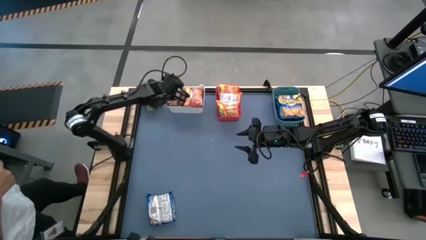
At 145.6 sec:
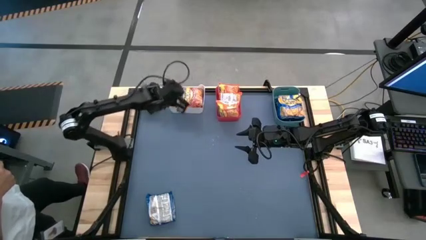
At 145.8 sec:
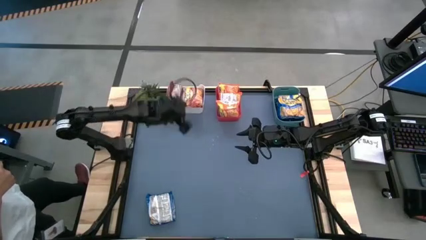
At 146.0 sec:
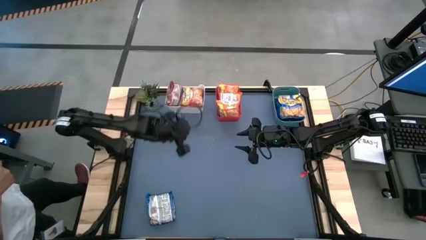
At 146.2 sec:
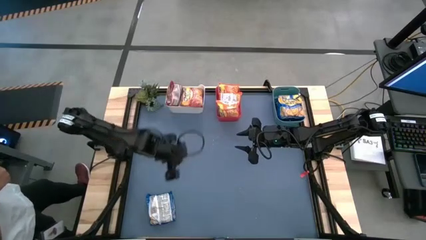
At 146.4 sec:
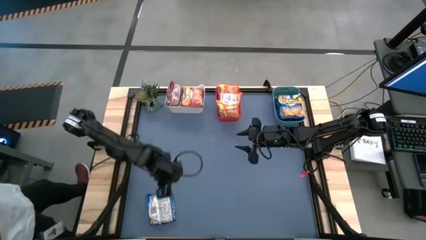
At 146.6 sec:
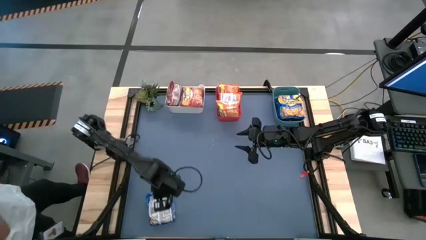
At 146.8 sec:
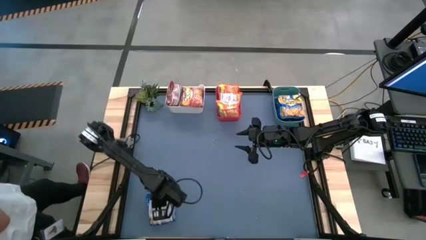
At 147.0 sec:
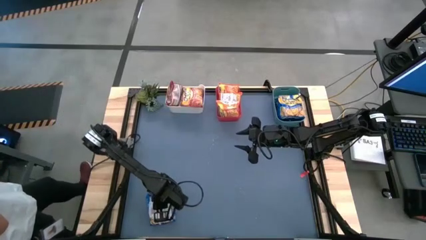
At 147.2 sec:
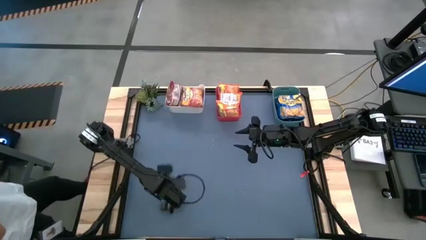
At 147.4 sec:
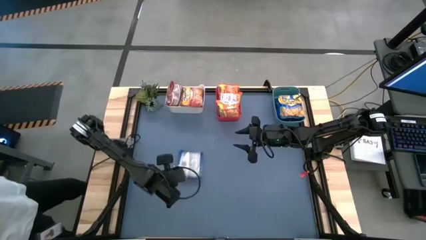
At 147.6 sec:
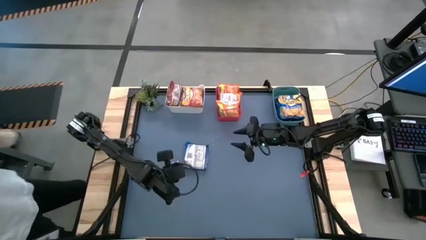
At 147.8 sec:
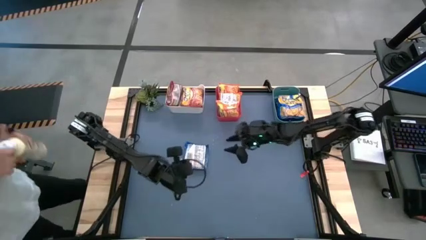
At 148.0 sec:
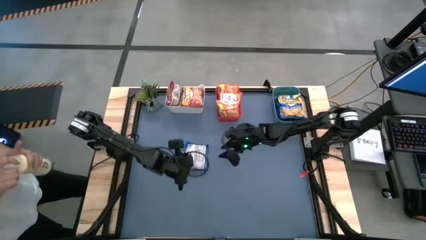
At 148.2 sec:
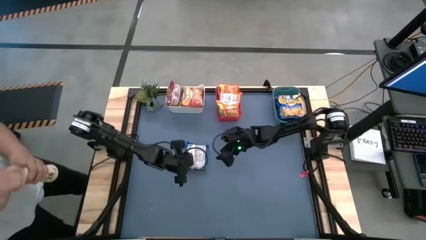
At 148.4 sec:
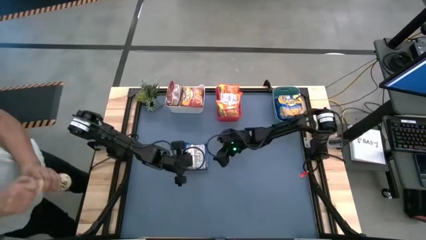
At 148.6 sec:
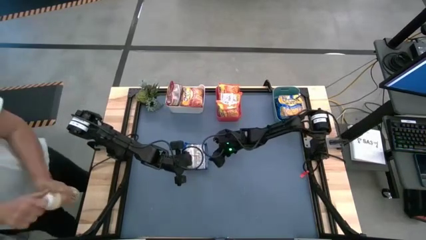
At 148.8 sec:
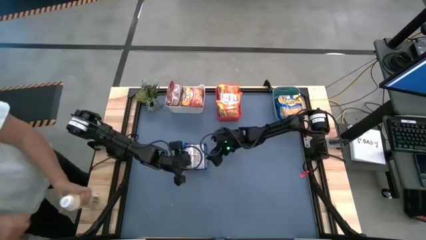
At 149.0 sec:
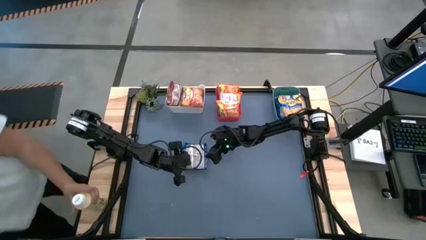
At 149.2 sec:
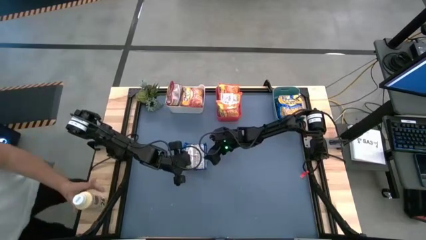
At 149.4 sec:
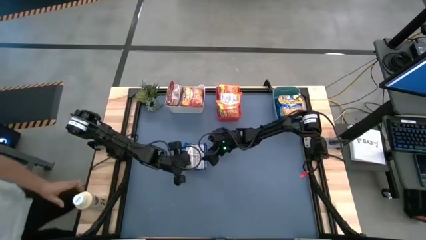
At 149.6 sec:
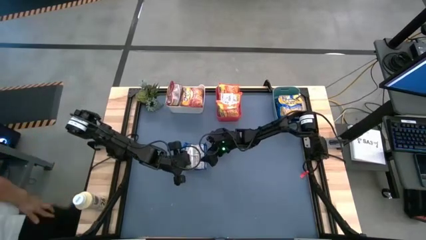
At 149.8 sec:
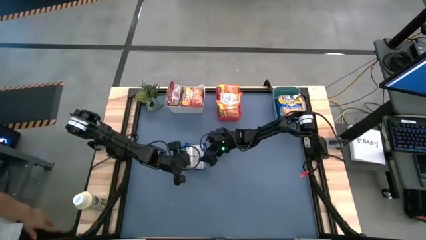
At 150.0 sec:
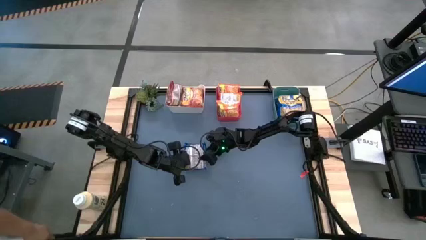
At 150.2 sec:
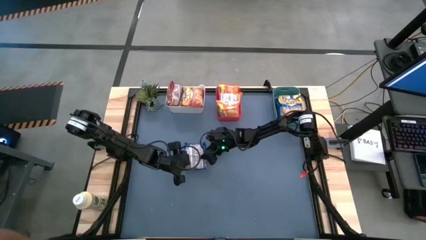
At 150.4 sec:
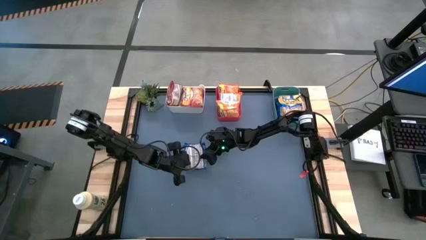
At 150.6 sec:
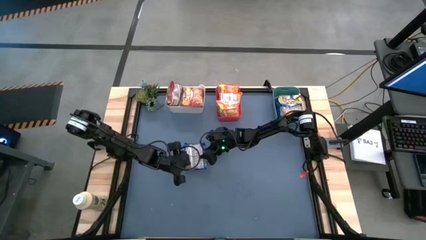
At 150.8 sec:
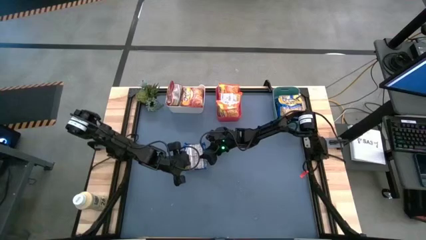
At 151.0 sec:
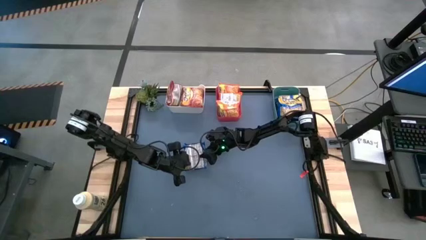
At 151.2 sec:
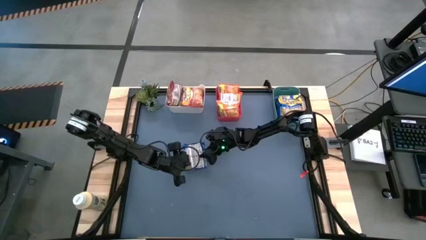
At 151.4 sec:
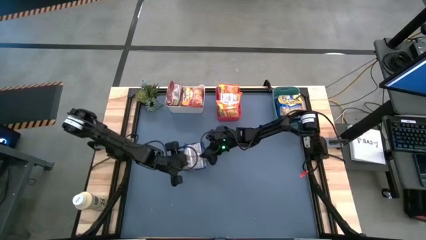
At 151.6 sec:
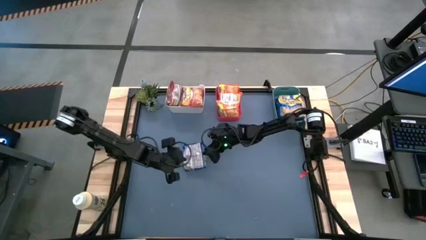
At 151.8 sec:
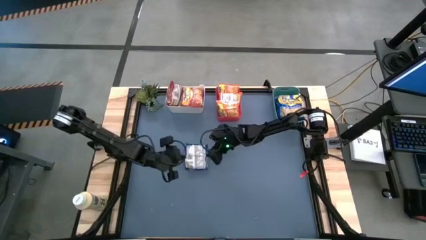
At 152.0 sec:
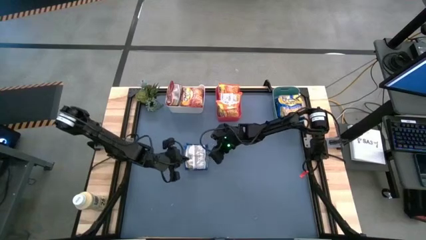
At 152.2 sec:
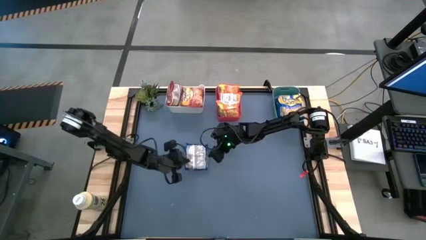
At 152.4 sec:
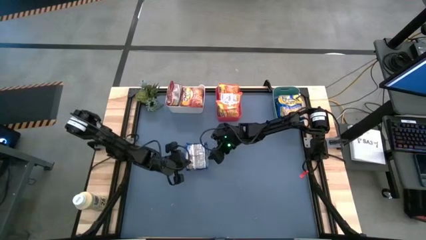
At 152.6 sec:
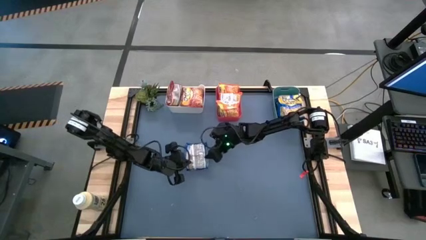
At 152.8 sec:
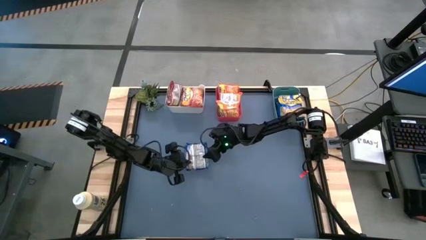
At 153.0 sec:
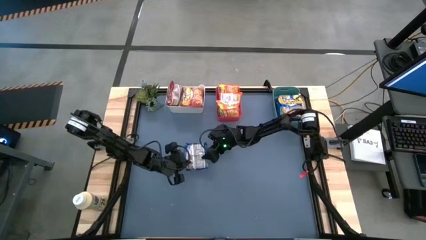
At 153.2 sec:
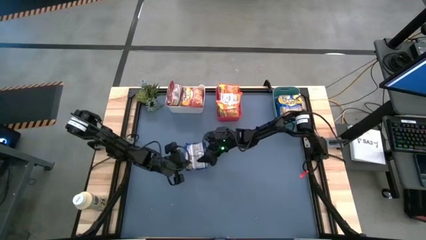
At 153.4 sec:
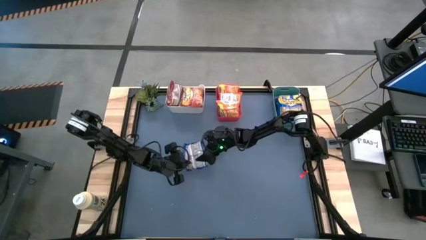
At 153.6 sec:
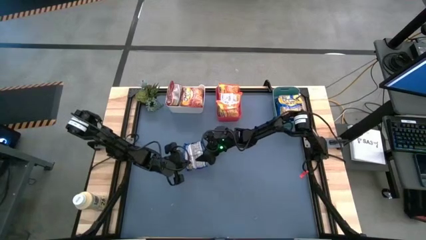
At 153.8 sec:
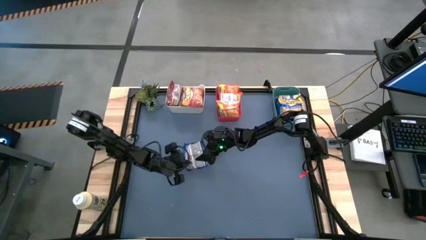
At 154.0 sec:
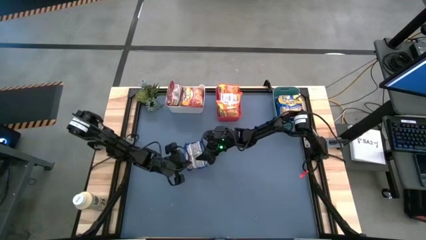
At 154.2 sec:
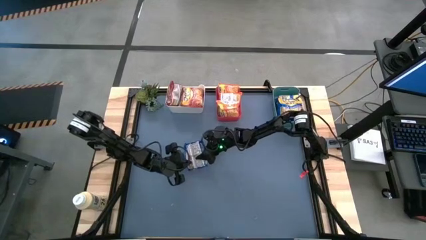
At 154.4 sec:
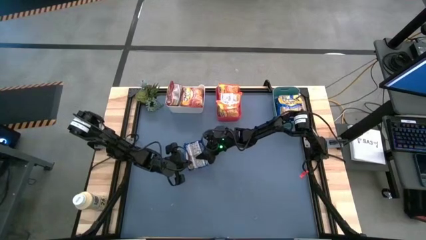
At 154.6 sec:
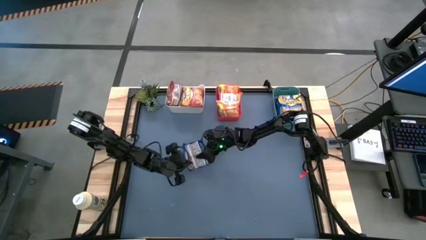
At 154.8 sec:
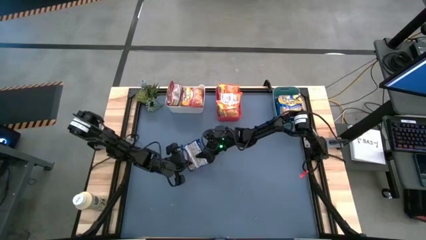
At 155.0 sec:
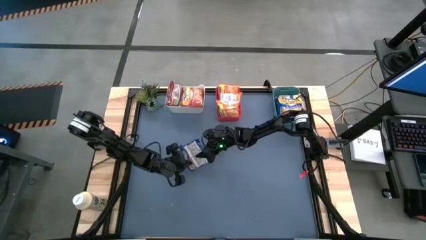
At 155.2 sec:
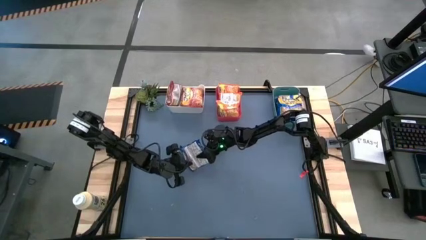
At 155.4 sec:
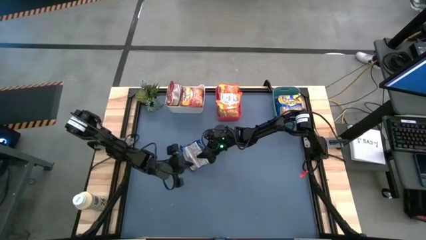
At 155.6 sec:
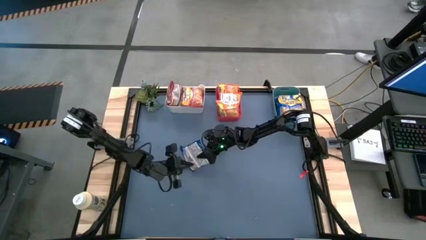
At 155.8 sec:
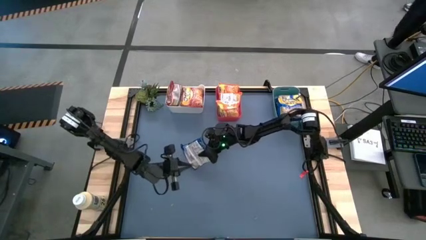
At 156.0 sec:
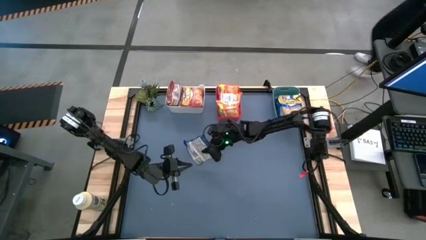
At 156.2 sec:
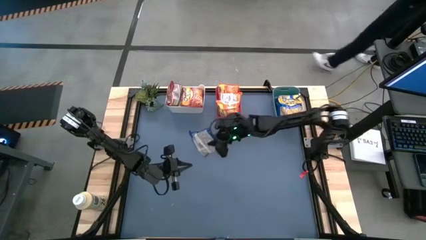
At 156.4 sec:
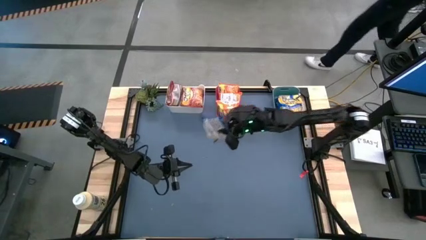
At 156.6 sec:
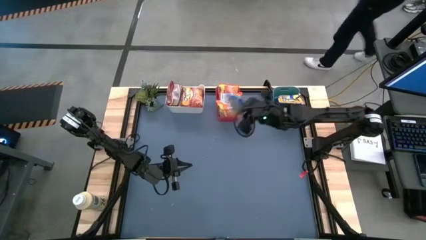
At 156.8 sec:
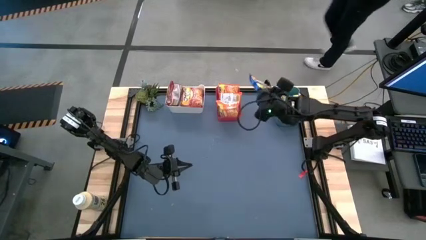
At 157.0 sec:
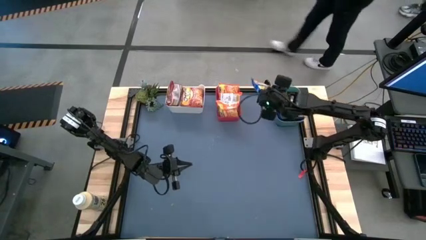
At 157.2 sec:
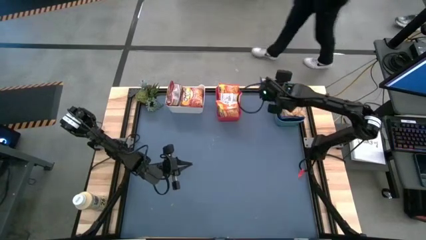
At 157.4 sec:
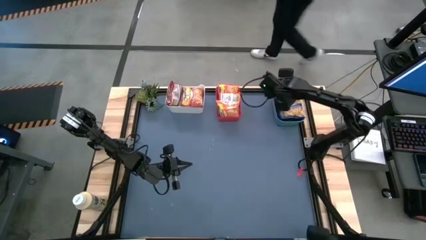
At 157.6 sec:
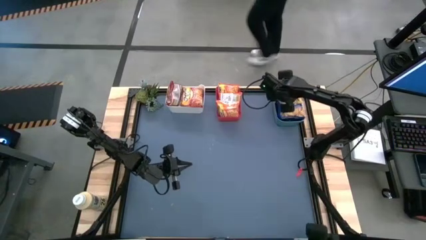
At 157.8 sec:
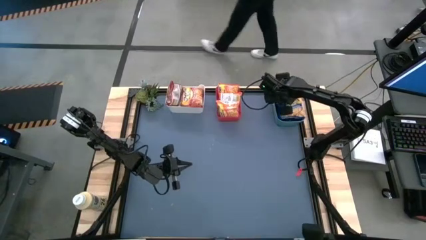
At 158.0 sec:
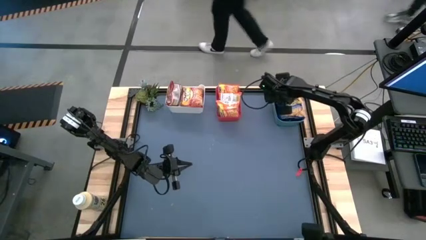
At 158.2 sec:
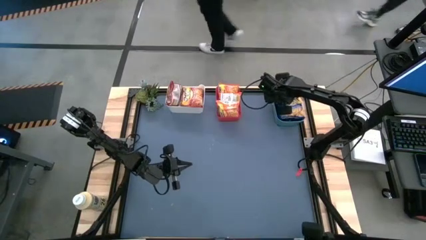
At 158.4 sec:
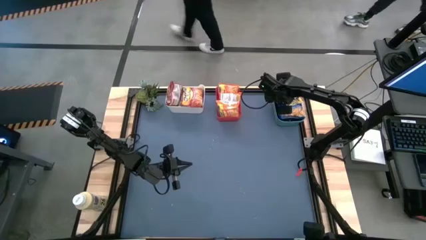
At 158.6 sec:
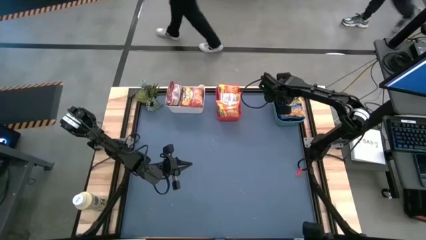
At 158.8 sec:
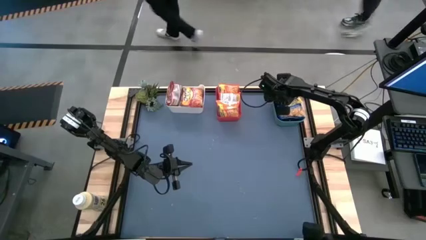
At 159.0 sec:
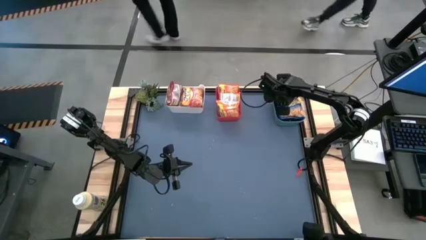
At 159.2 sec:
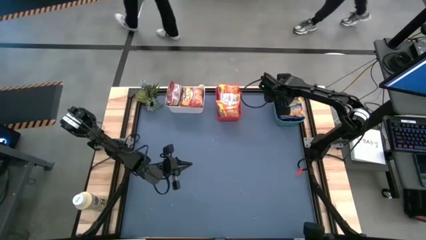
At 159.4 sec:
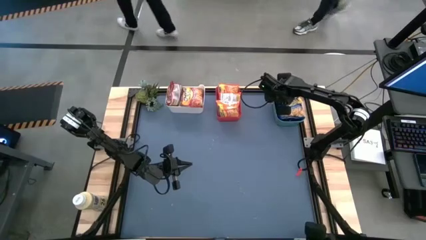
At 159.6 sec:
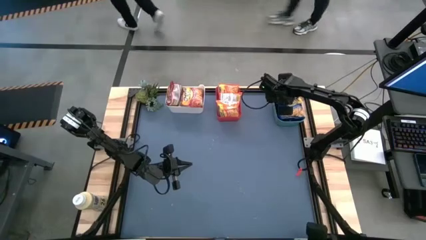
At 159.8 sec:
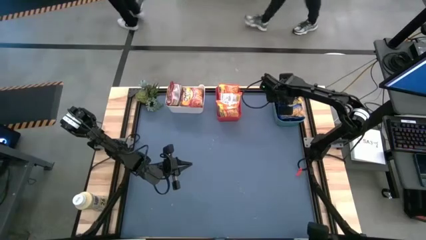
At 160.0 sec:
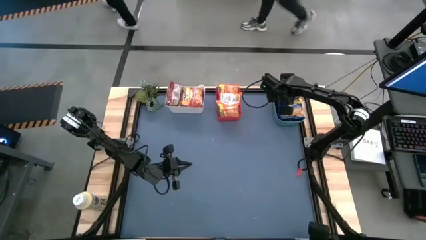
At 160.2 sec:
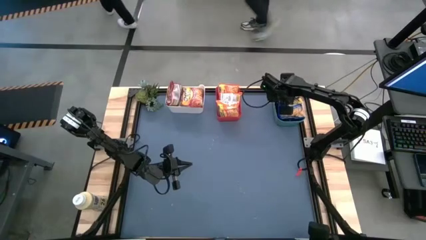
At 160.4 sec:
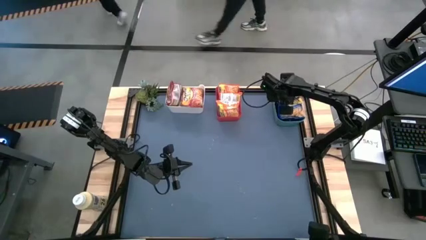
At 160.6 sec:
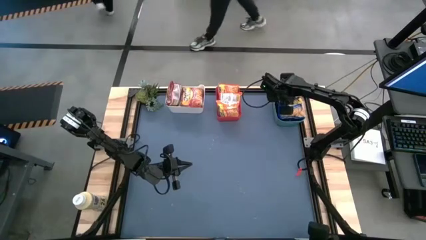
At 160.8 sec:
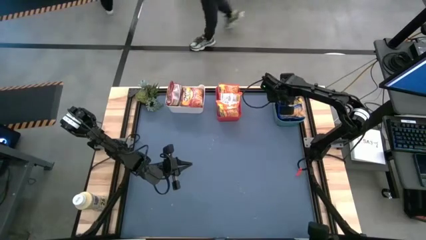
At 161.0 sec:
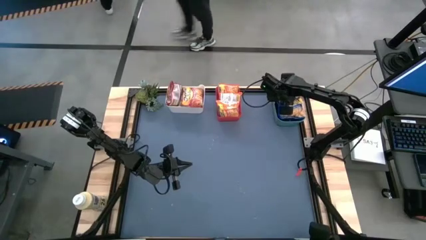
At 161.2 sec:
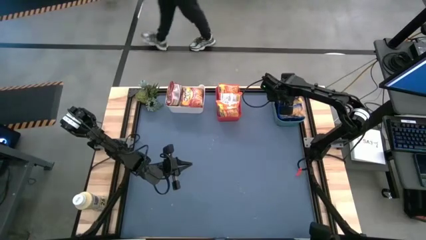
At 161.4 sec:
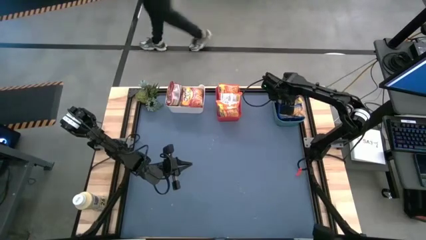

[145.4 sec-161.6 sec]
Task: Sort Maruchan noodles
Put the blue noodle pack into the green bin
